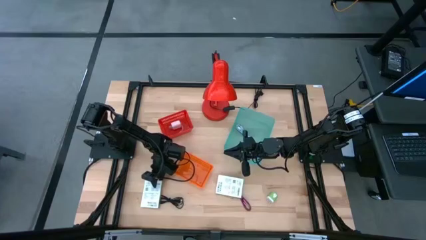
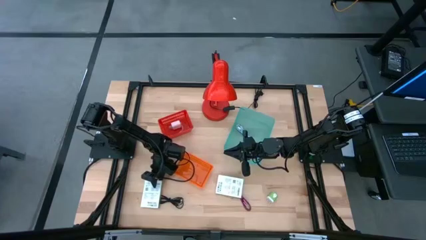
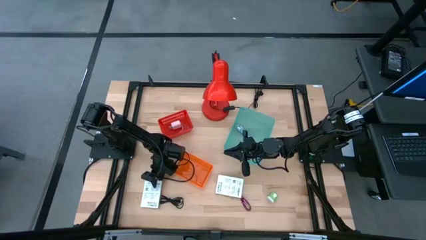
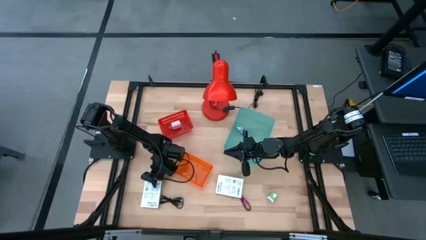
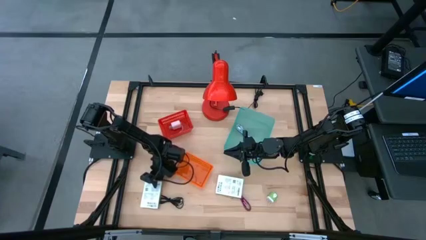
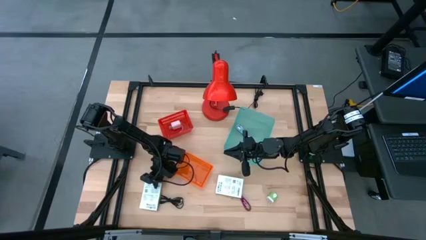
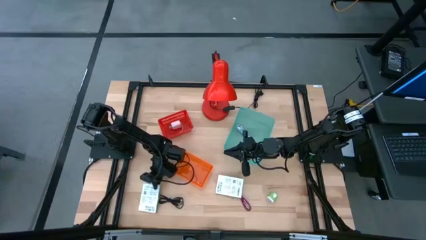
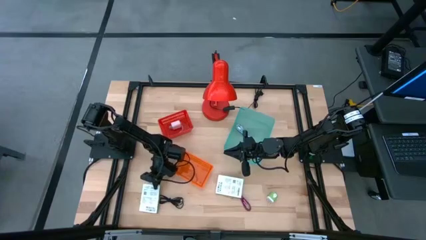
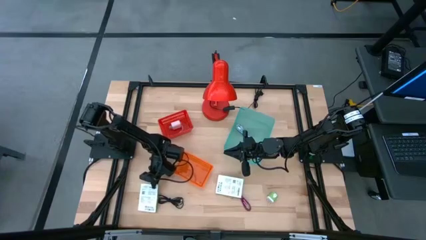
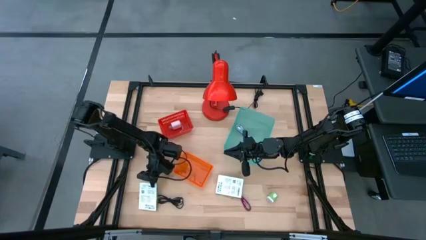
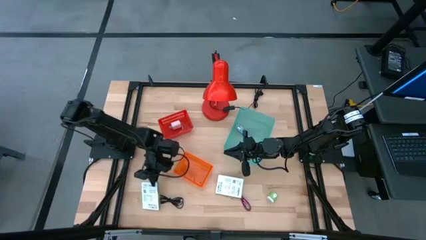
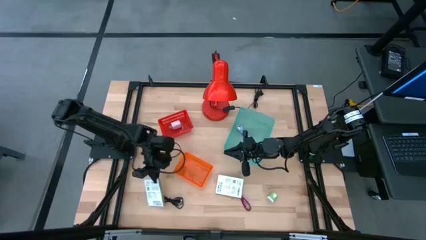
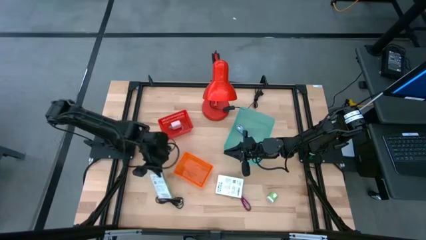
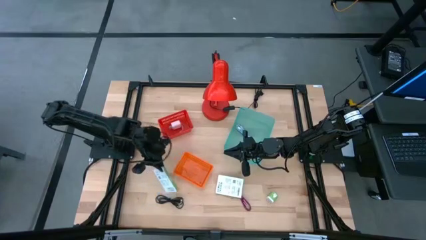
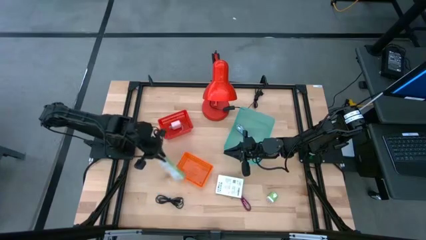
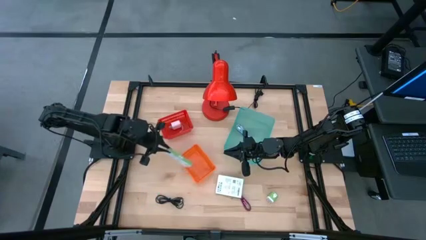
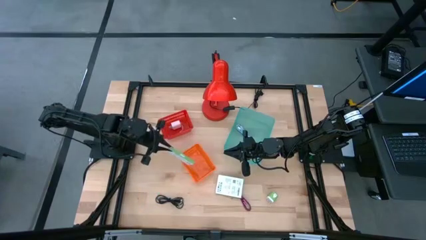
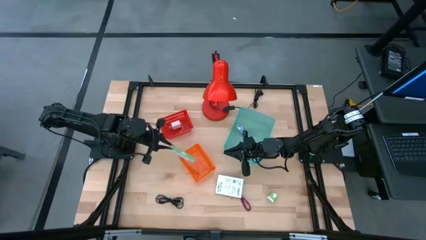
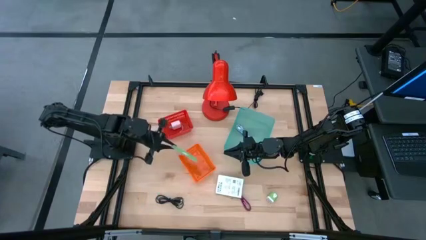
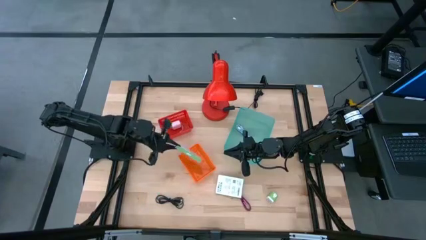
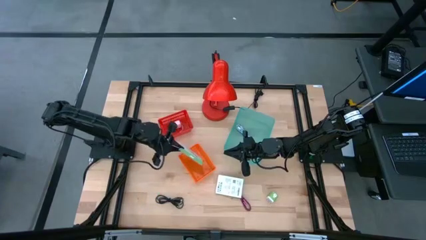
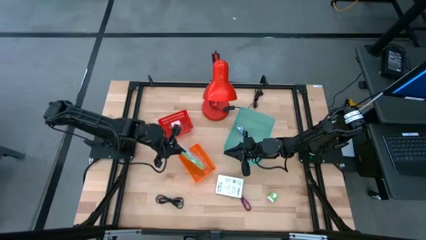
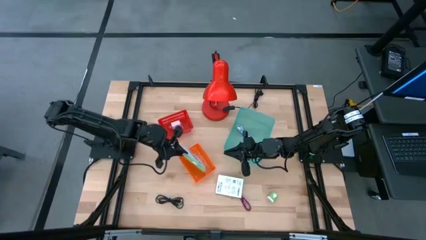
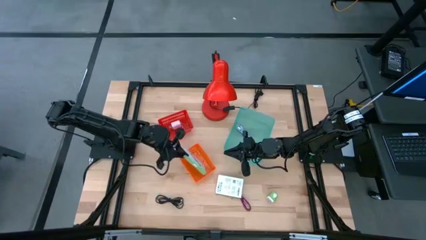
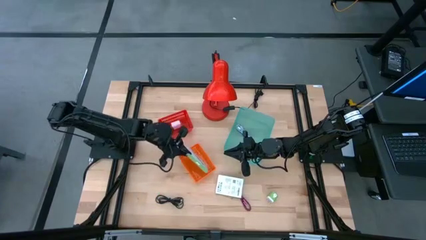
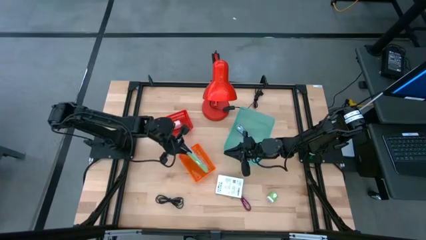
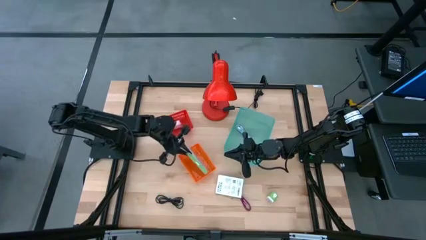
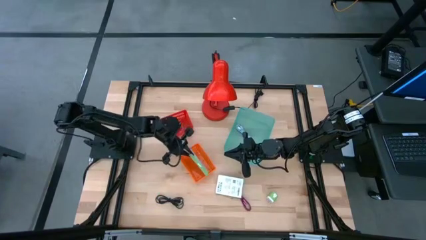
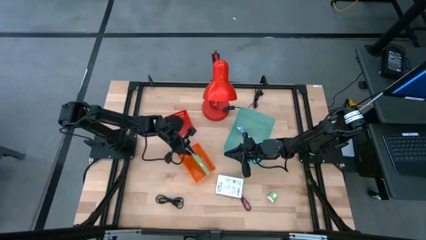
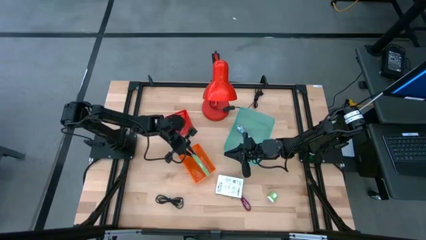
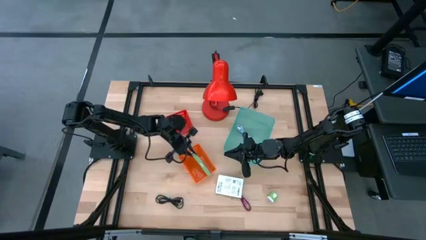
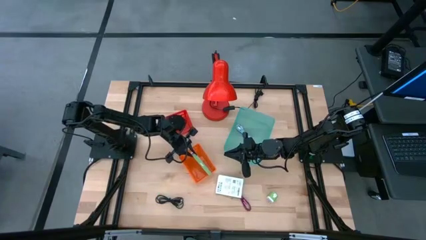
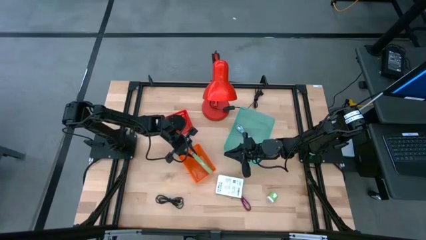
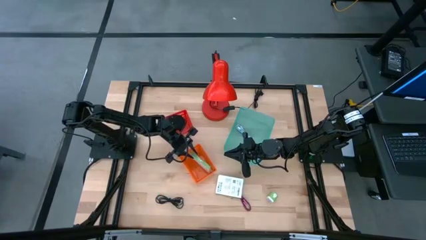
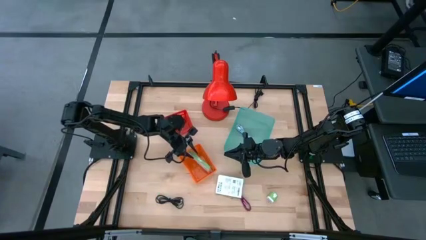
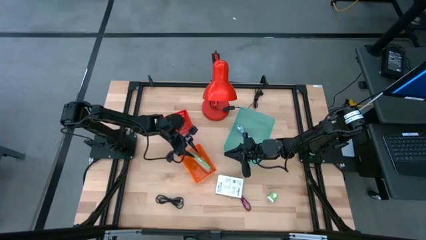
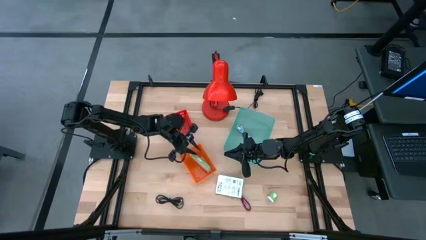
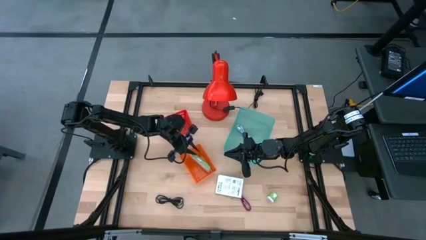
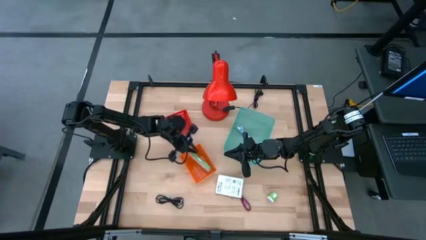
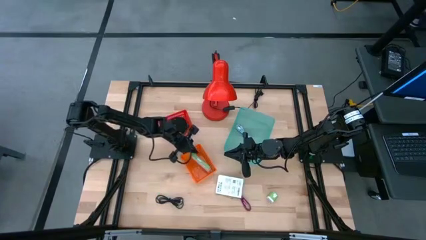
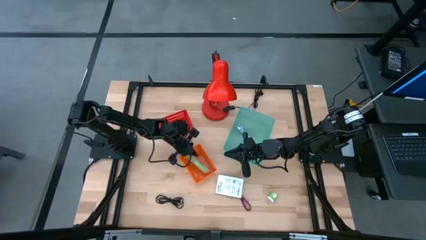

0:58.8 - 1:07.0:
Task: Pick and place items into bin
Put the left white card reader box into the orange bin

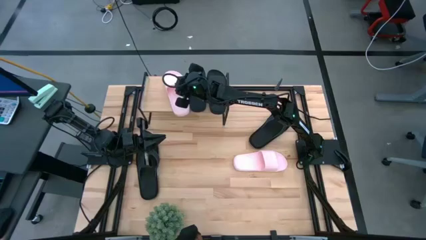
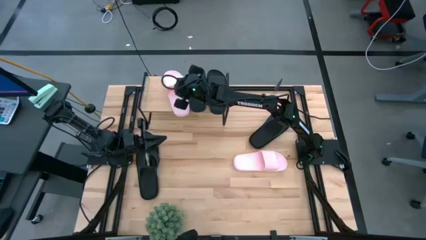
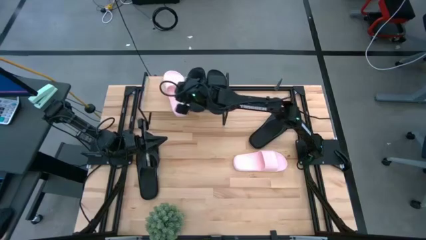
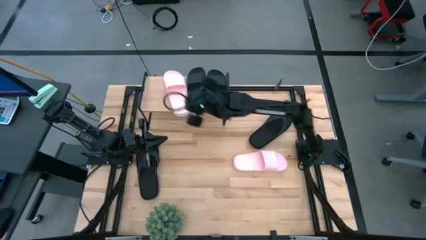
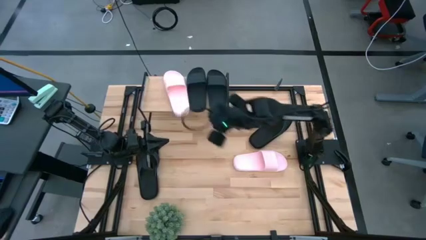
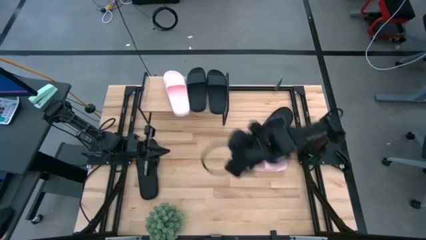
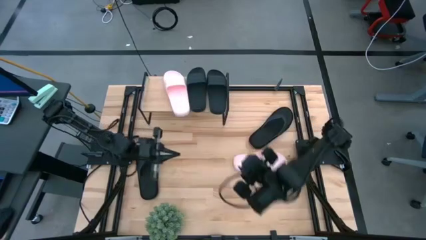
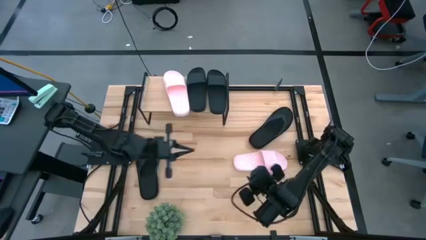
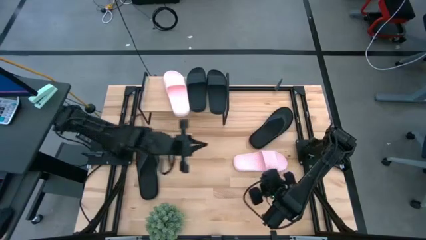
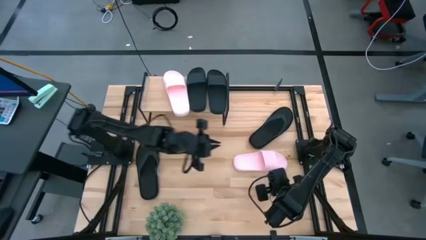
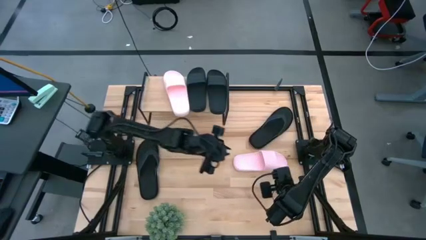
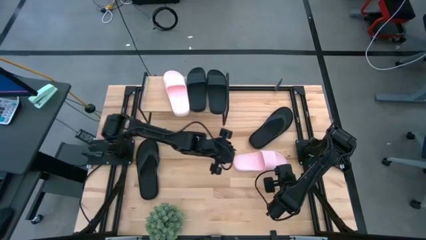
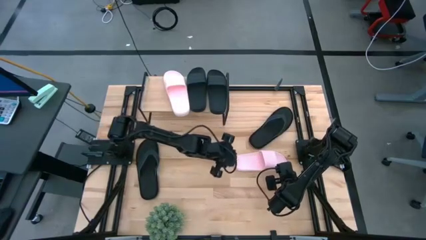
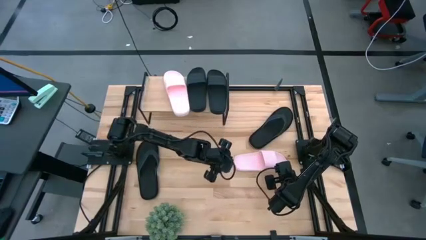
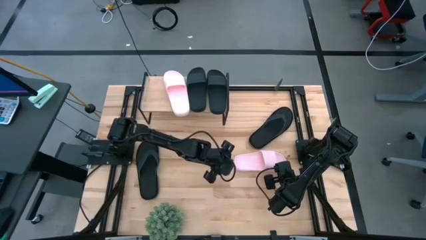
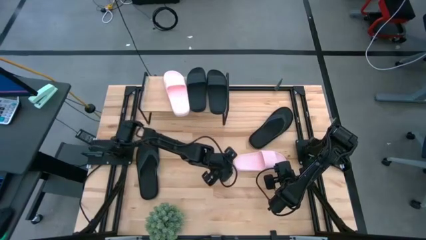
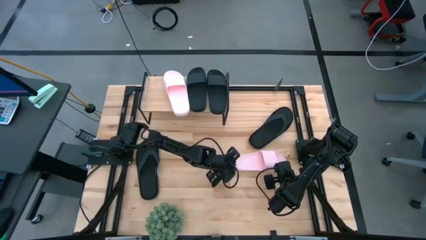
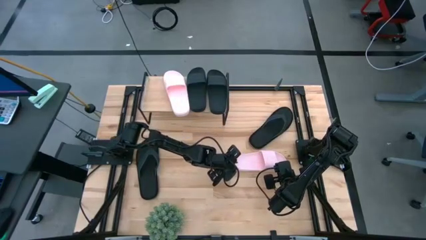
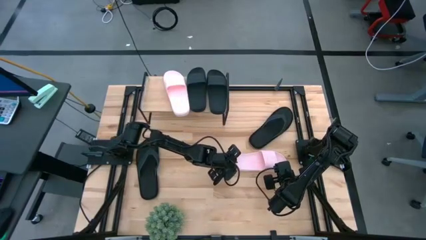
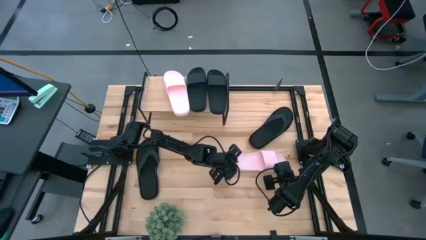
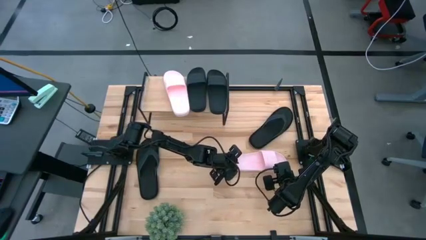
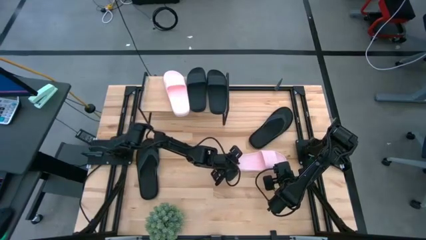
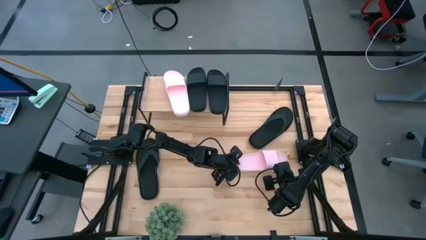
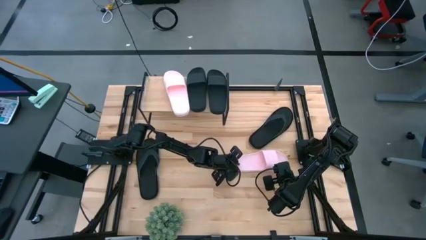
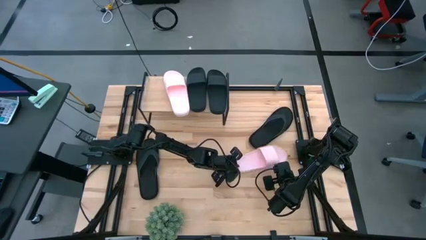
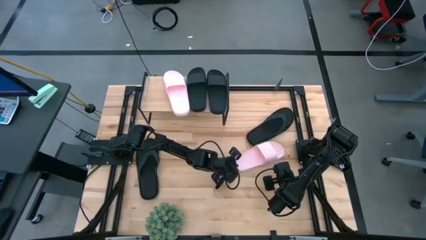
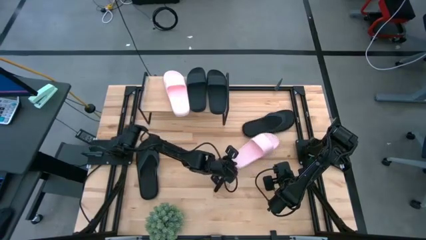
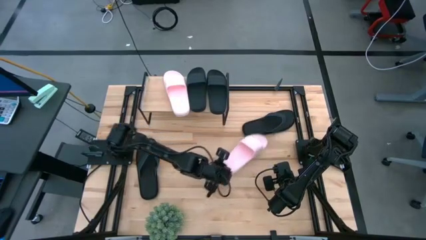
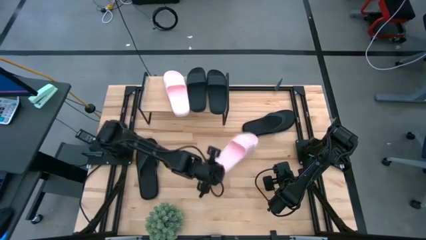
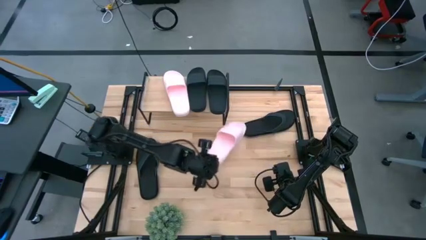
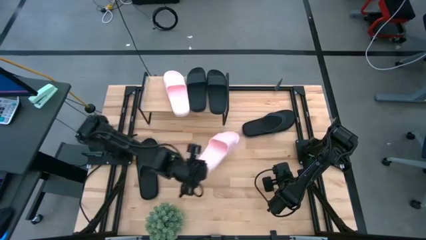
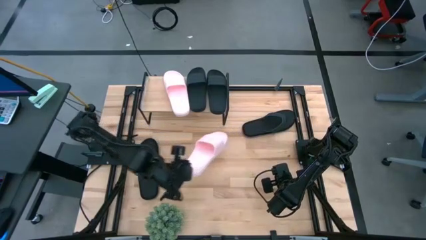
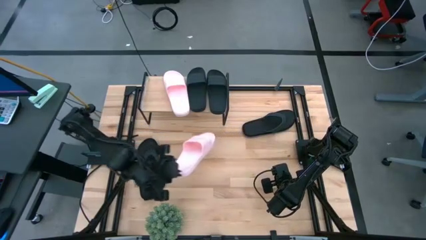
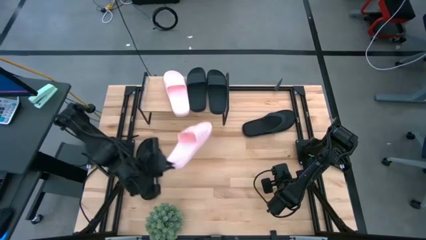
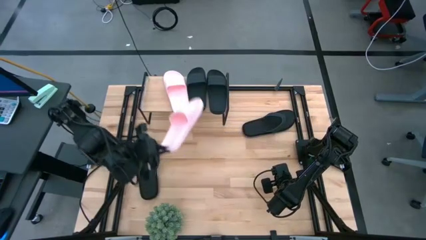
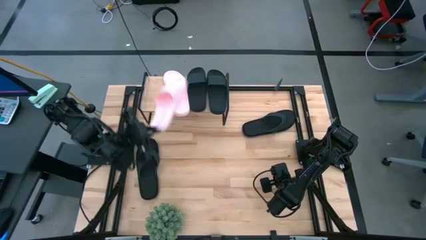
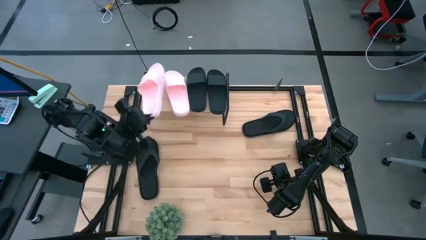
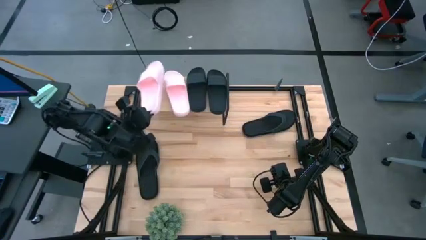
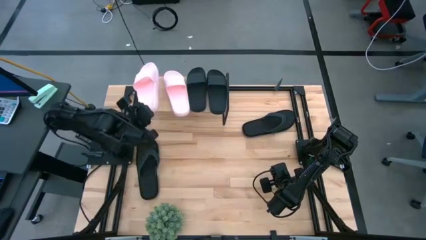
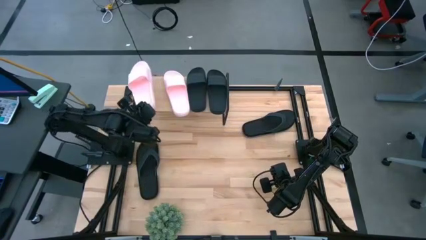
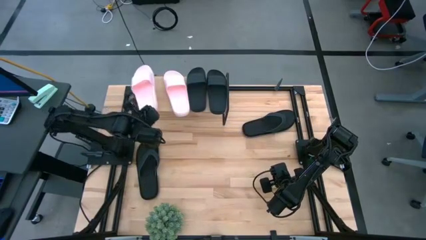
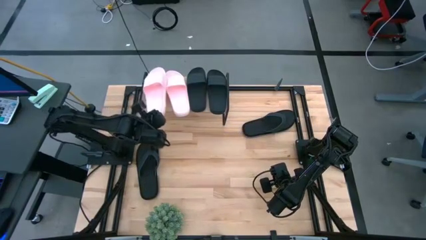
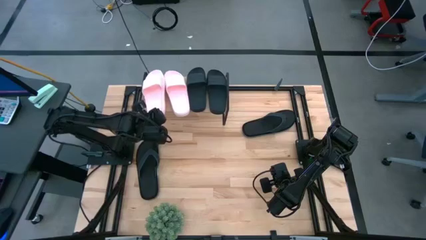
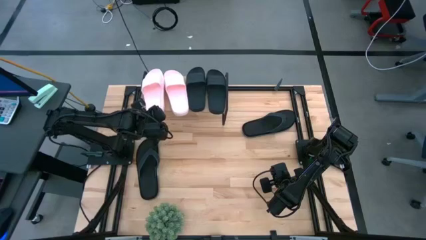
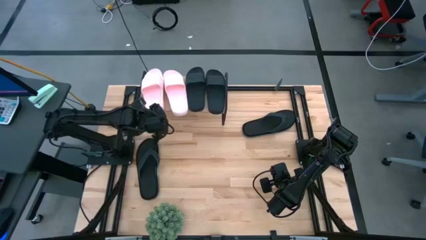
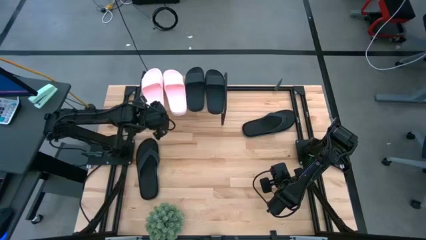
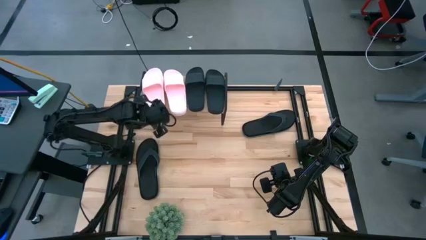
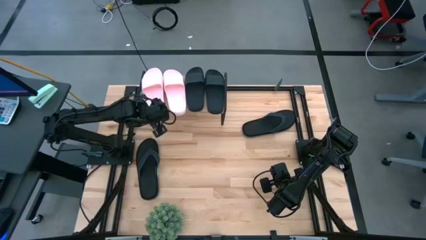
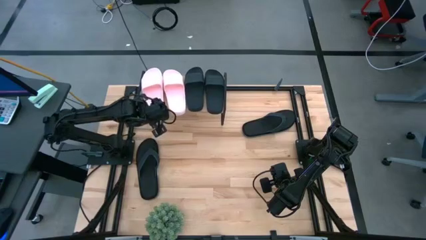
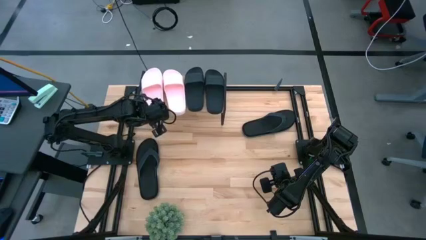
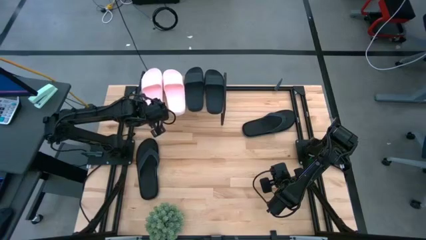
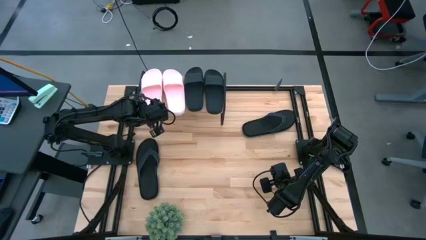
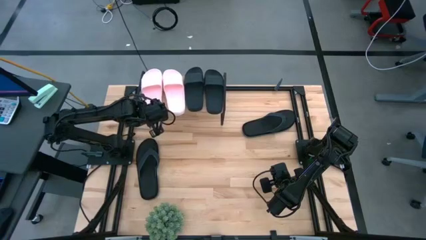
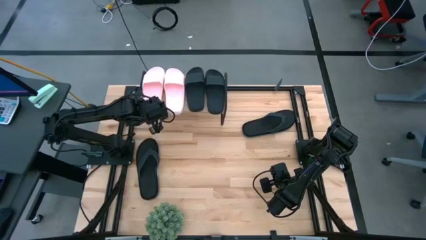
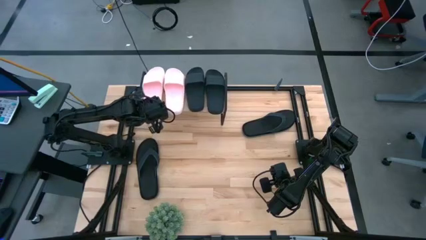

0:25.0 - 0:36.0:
Task: Pick and place slides into the shelf
Put the pink slide on the shelf
